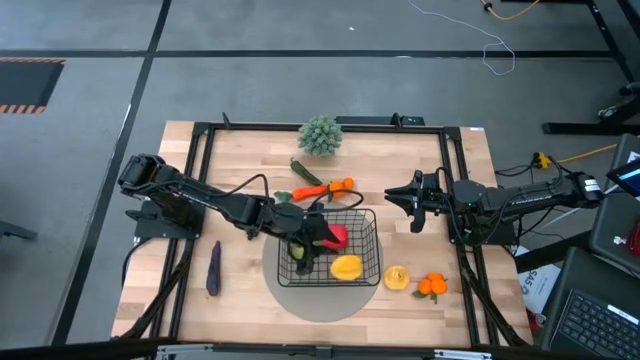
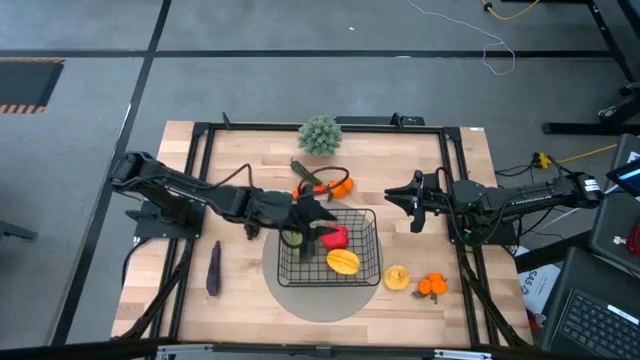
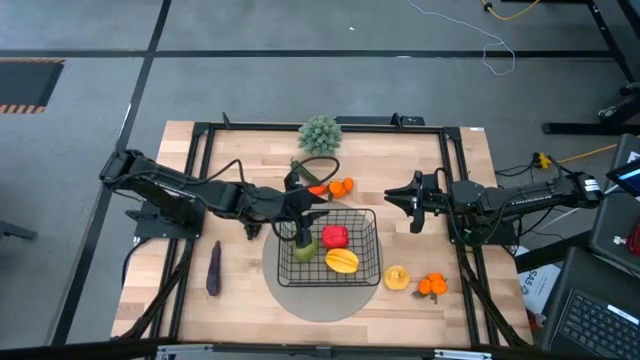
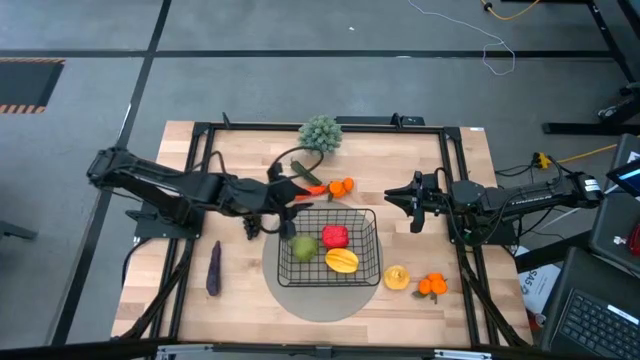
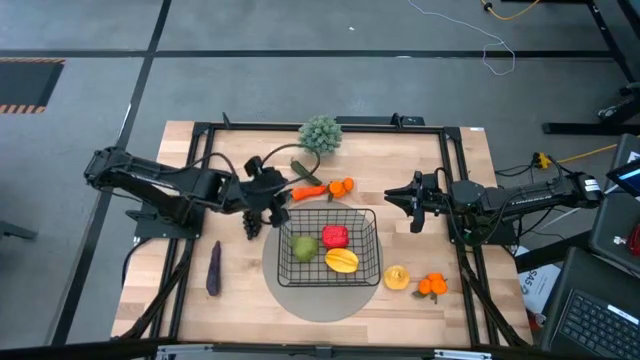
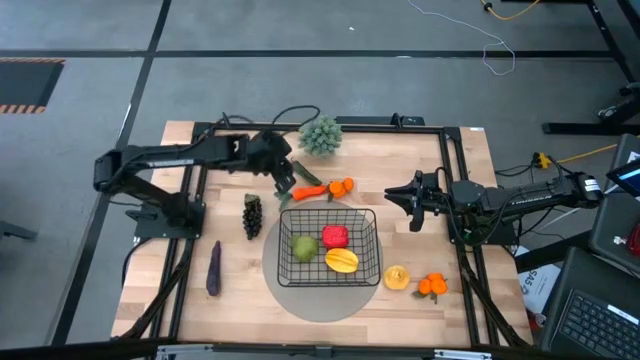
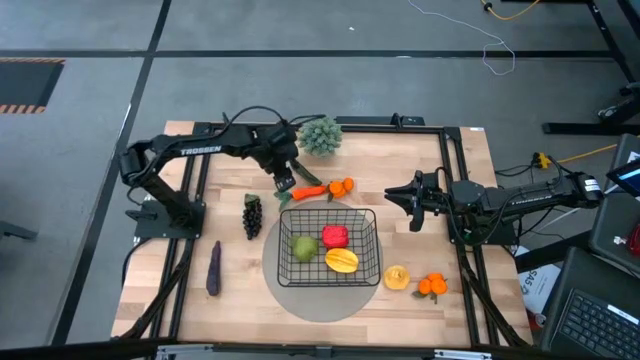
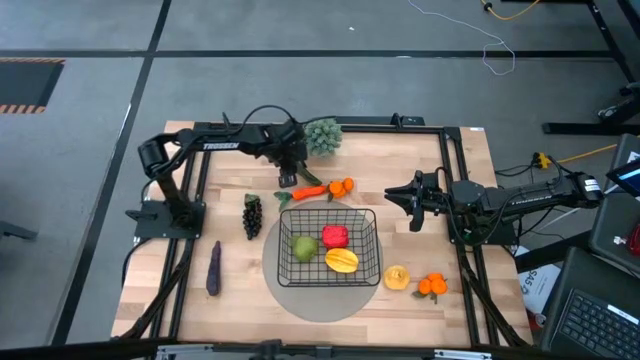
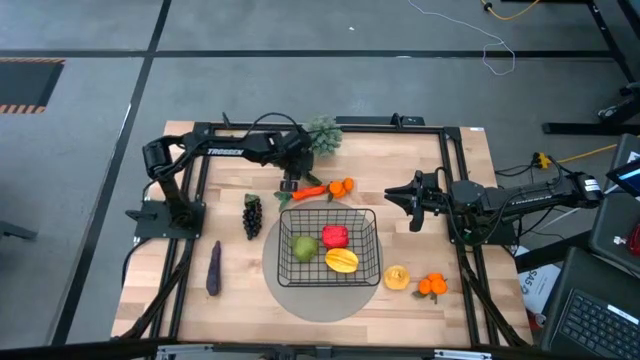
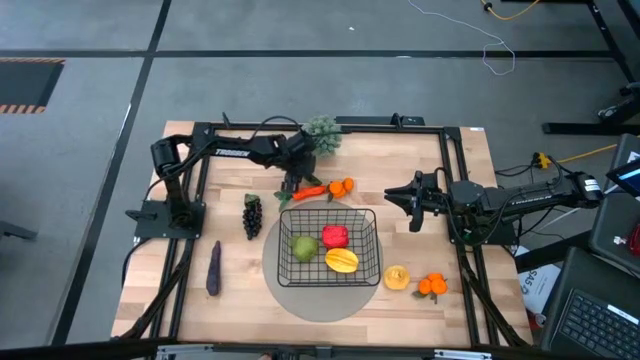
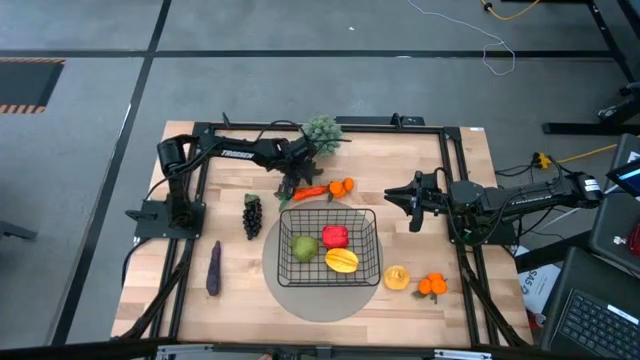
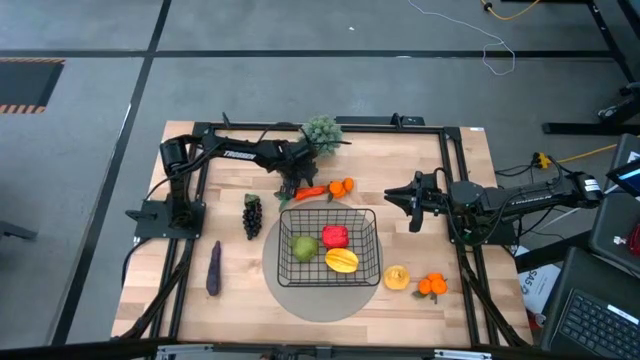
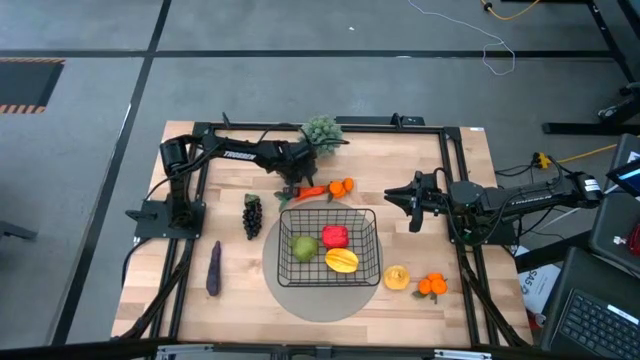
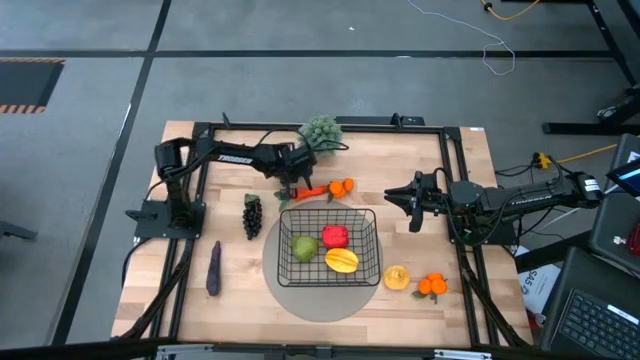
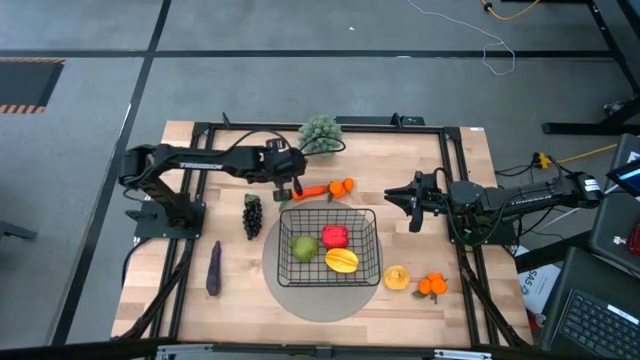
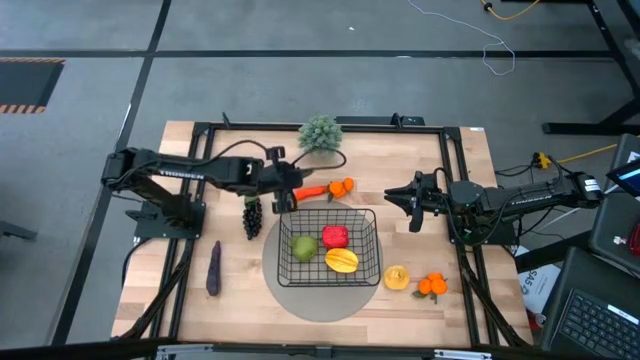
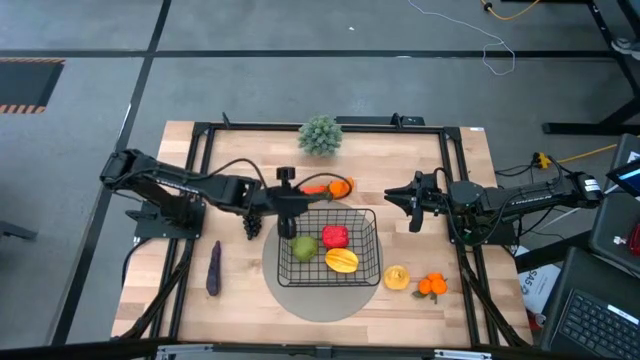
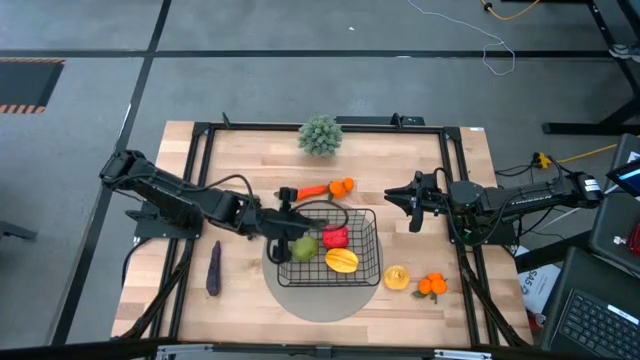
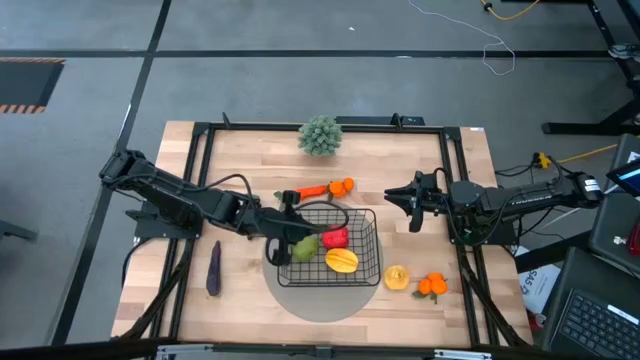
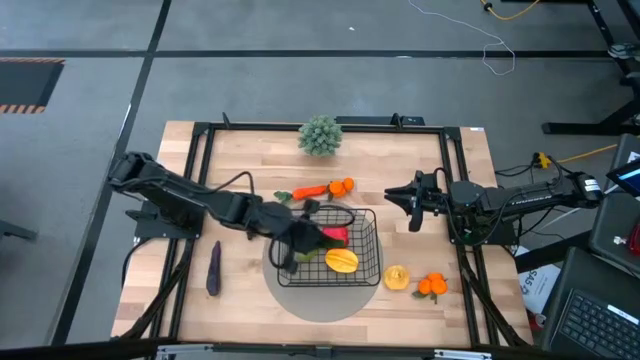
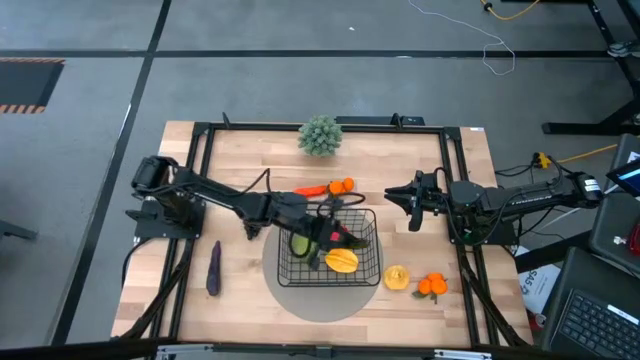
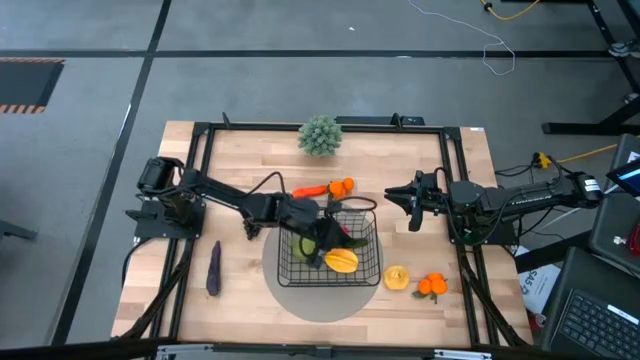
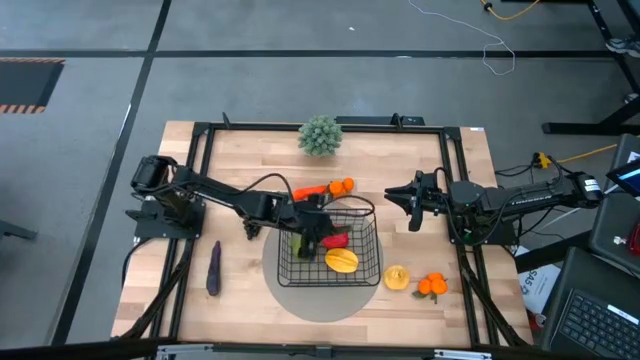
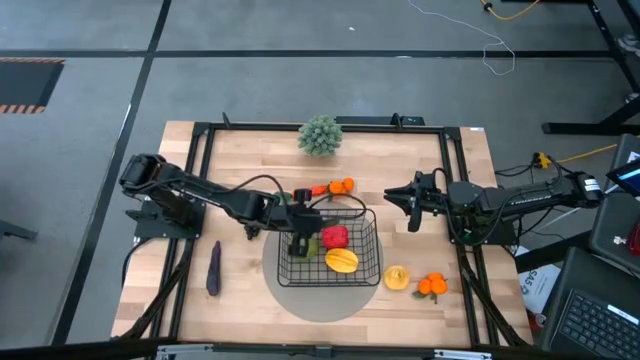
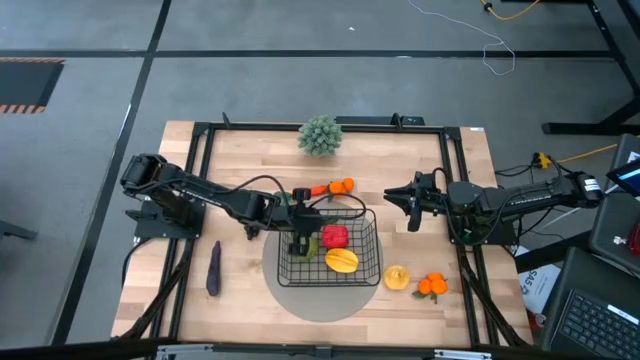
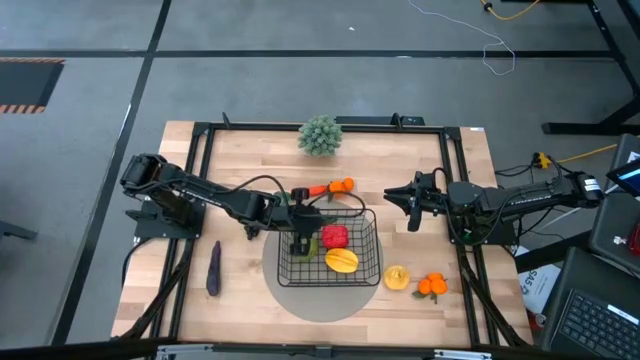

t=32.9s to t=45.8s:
Task: Build produce basket
Put the green chili pepper into the black wire basket

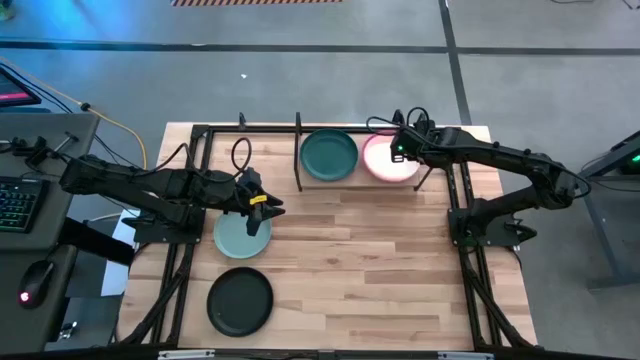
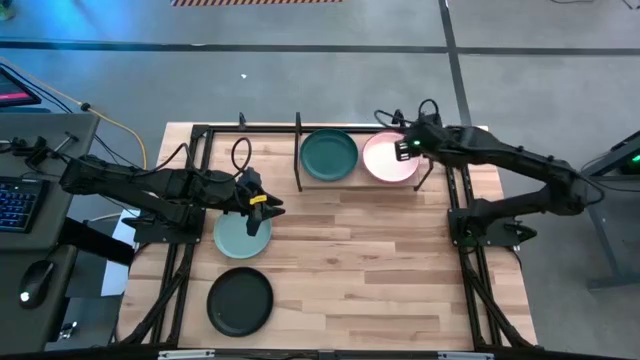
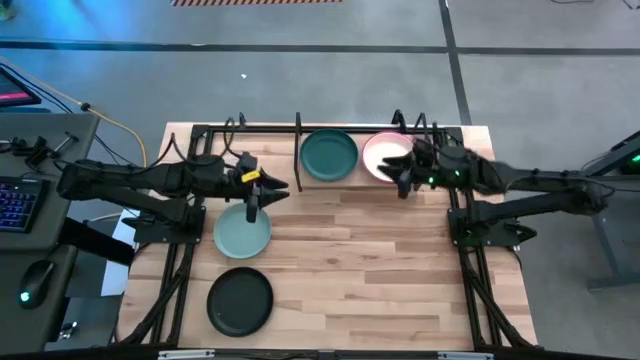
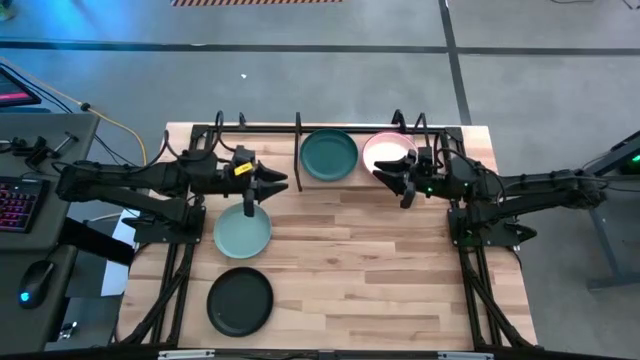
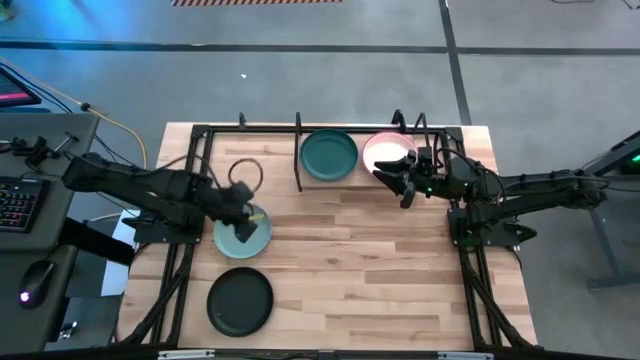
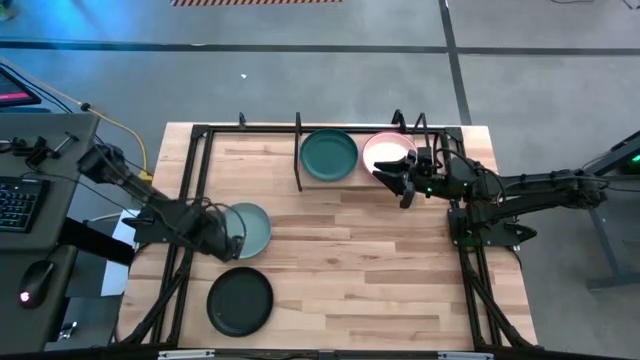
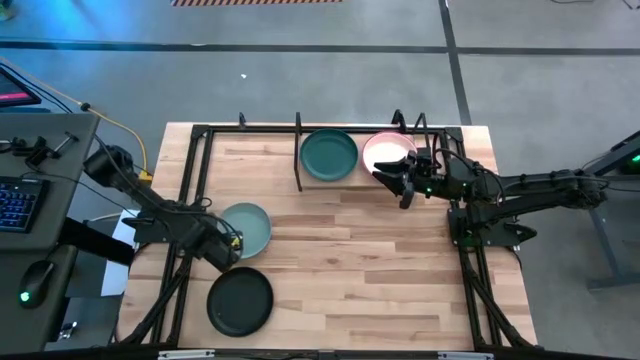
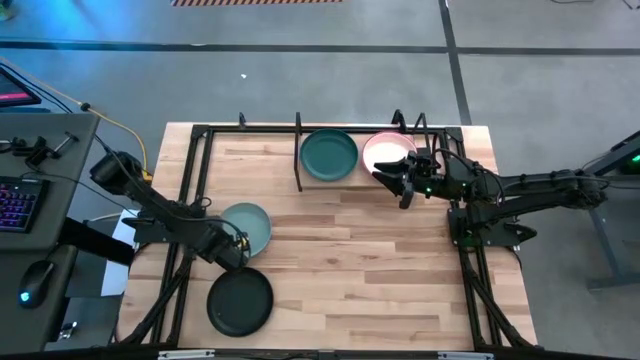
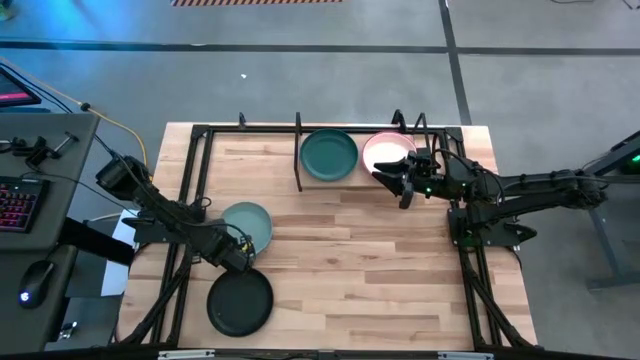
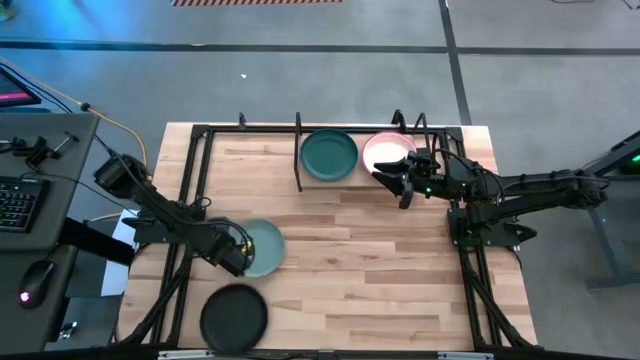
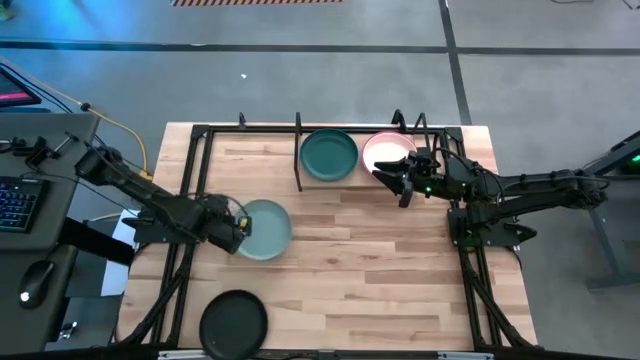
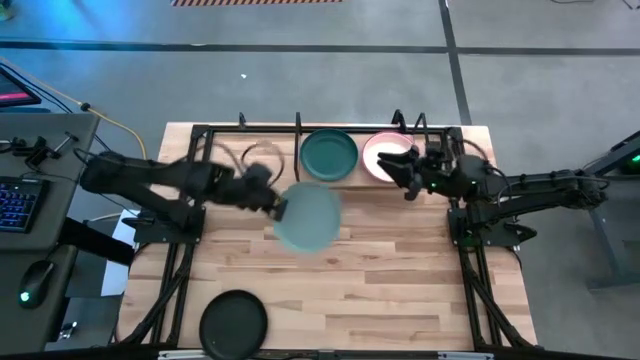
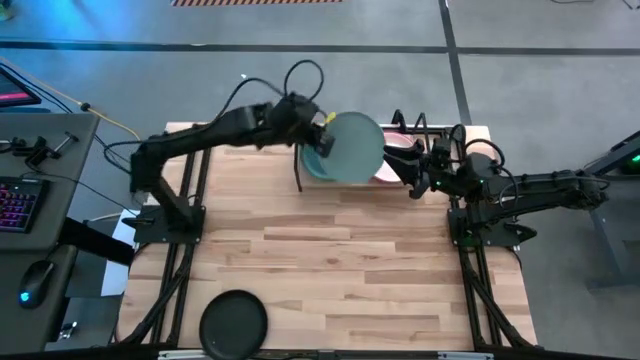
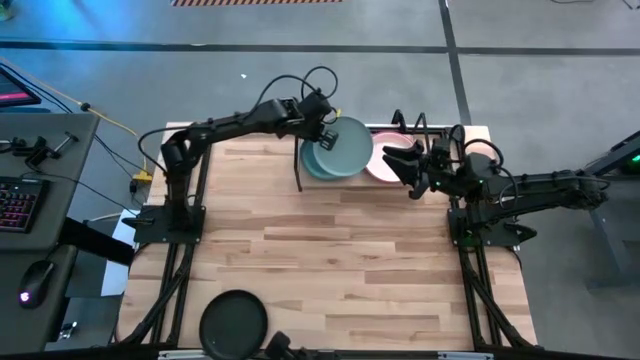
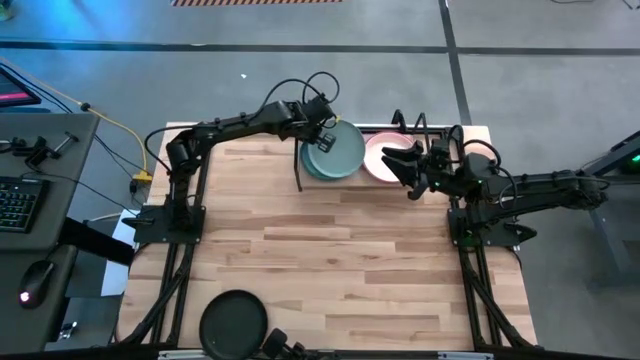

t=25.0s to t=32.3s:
Task: Place and stack plates onto a shelf
Stack the gray plate on top of the dark blue plate
